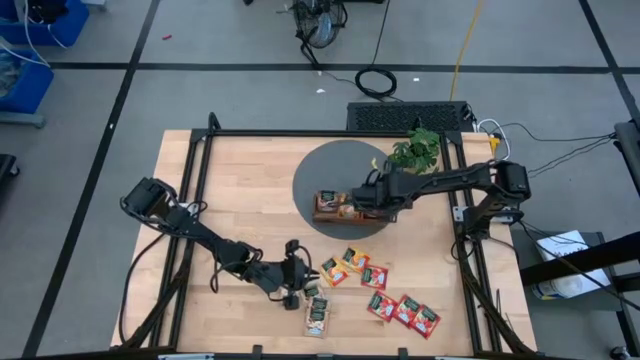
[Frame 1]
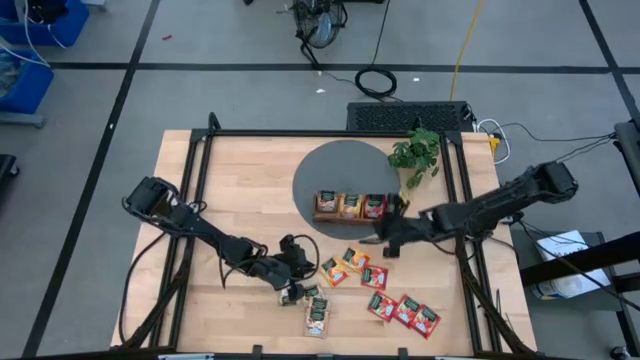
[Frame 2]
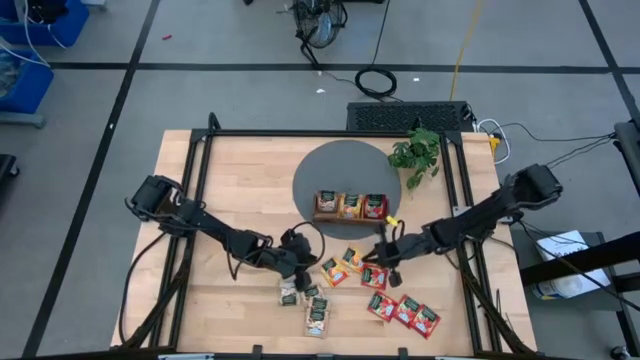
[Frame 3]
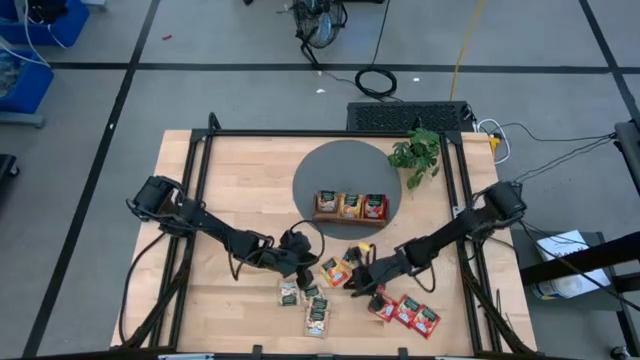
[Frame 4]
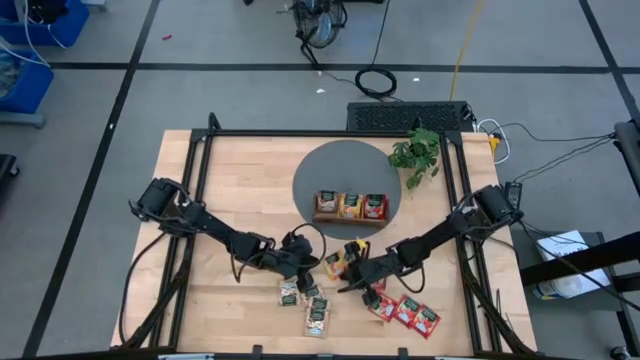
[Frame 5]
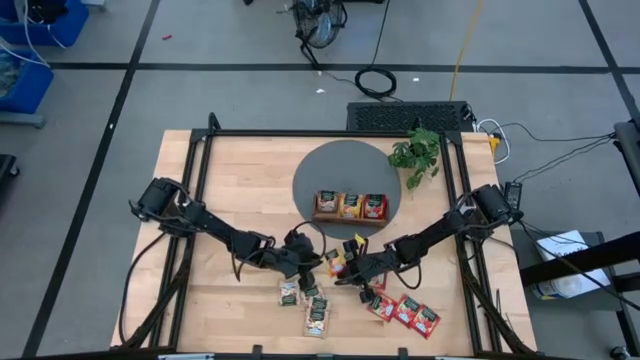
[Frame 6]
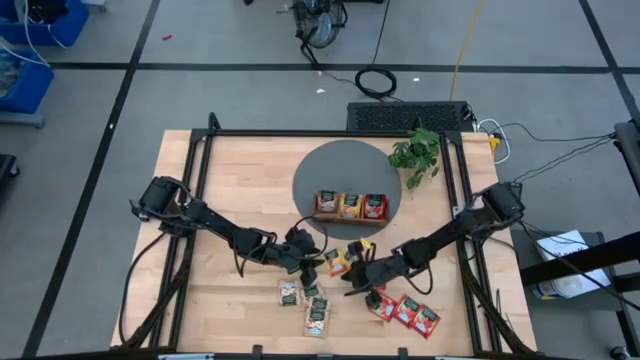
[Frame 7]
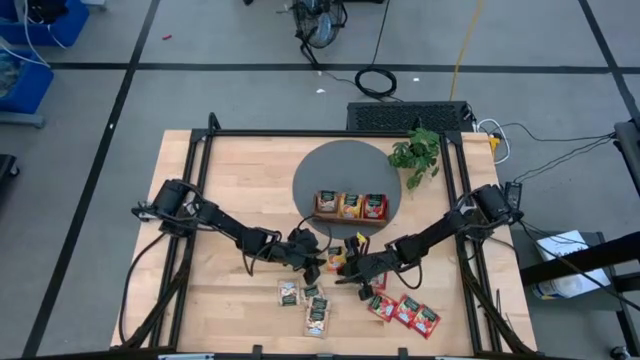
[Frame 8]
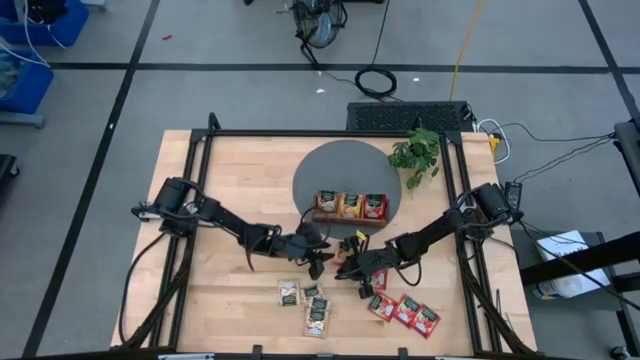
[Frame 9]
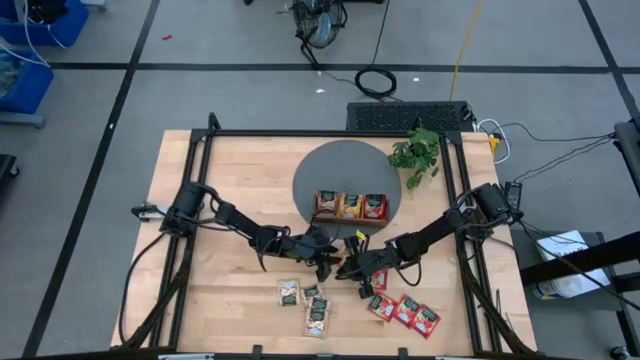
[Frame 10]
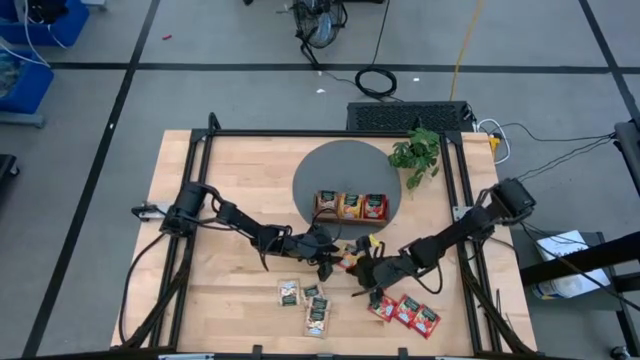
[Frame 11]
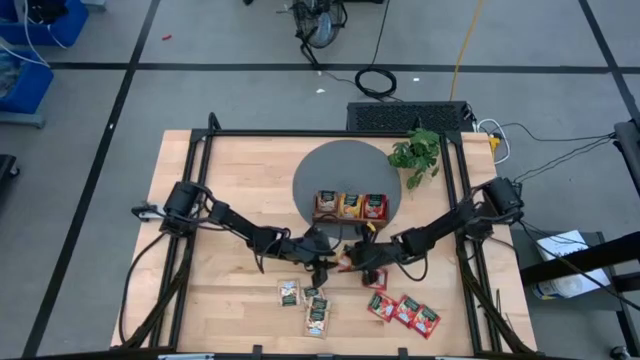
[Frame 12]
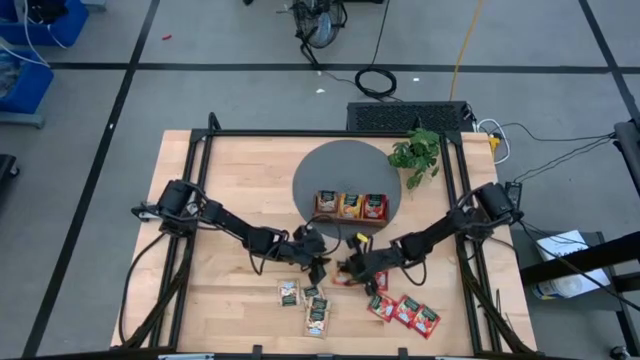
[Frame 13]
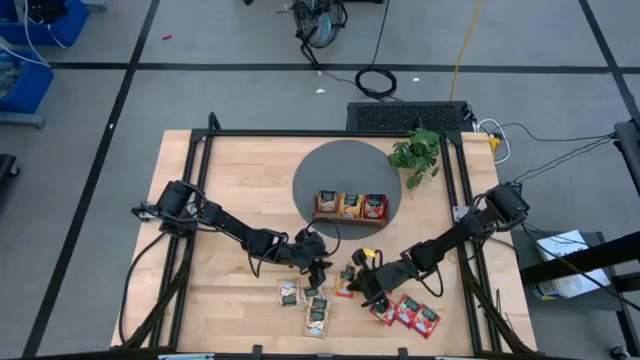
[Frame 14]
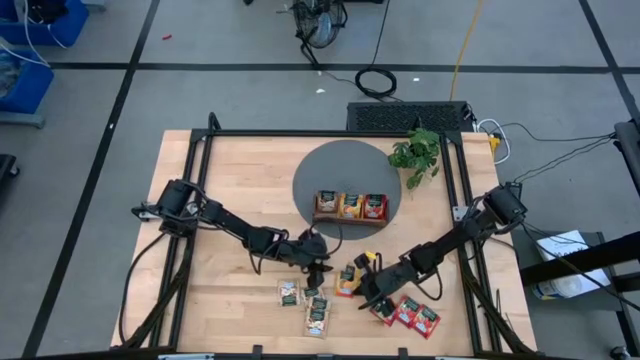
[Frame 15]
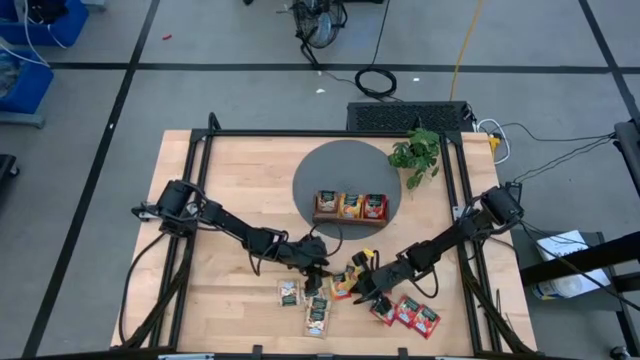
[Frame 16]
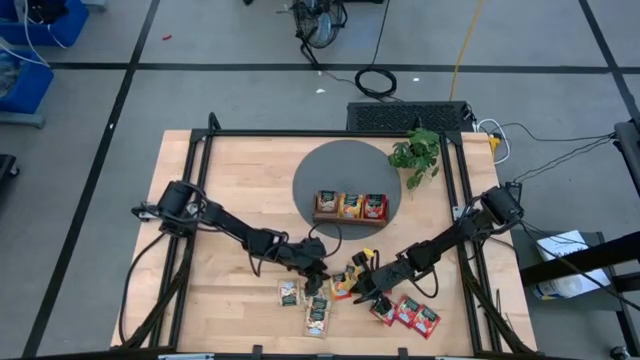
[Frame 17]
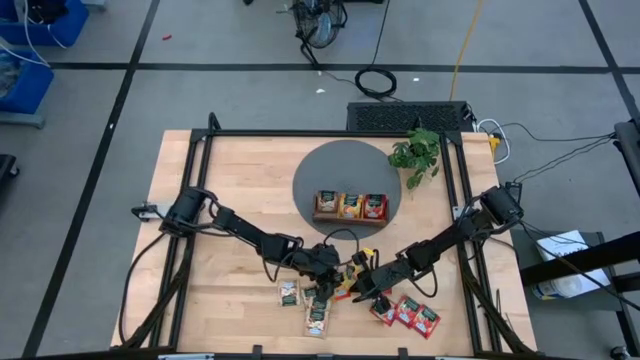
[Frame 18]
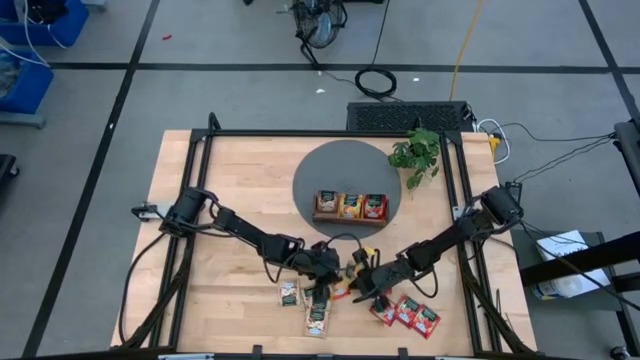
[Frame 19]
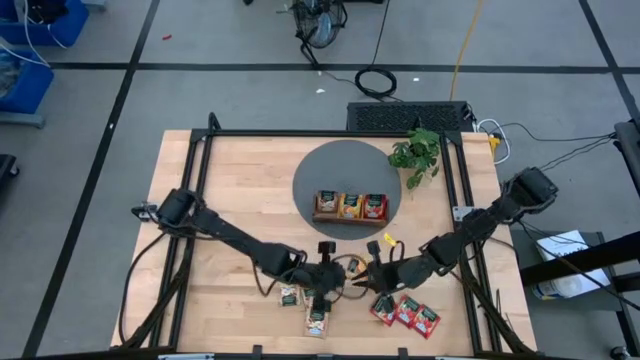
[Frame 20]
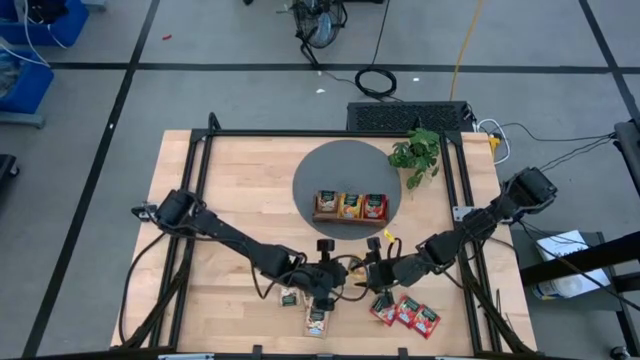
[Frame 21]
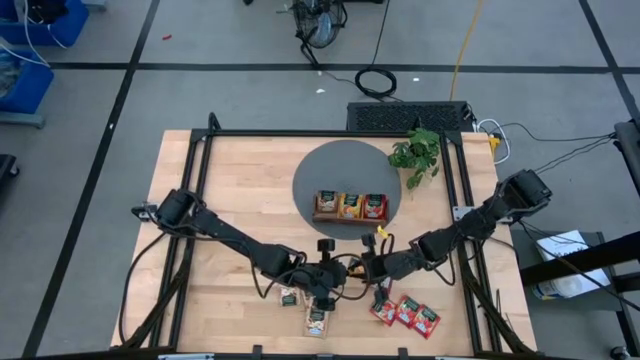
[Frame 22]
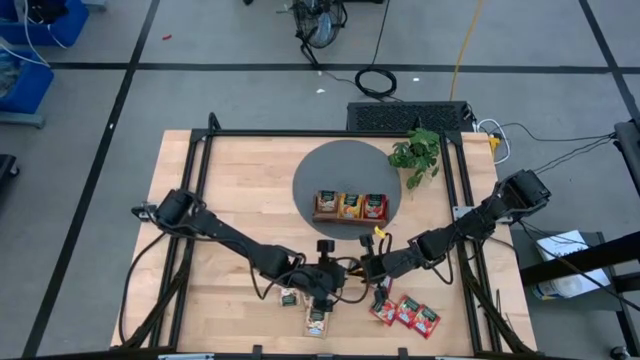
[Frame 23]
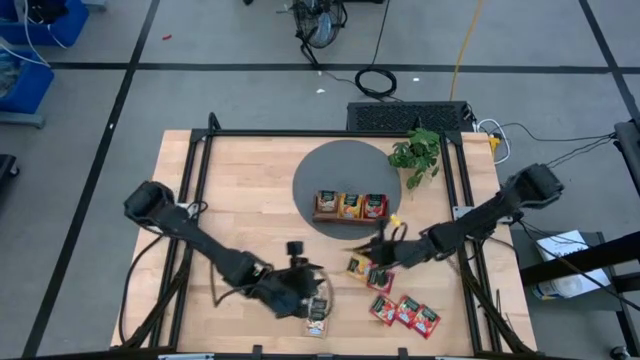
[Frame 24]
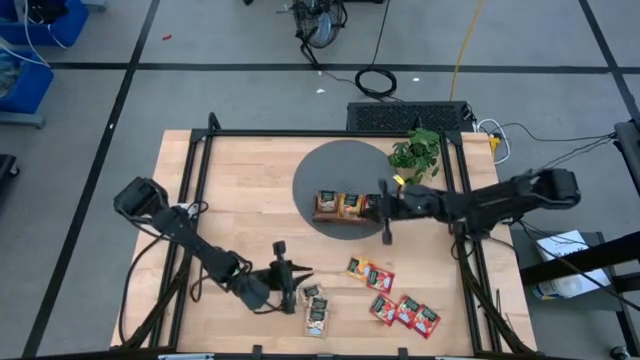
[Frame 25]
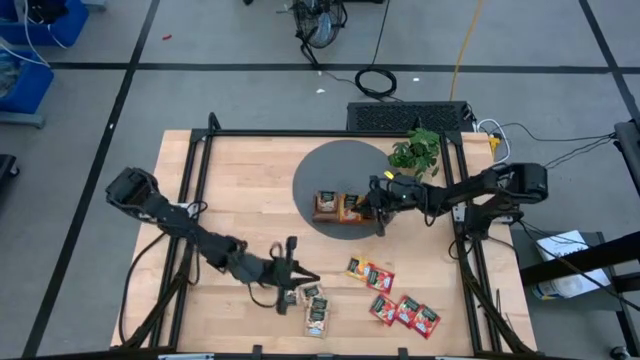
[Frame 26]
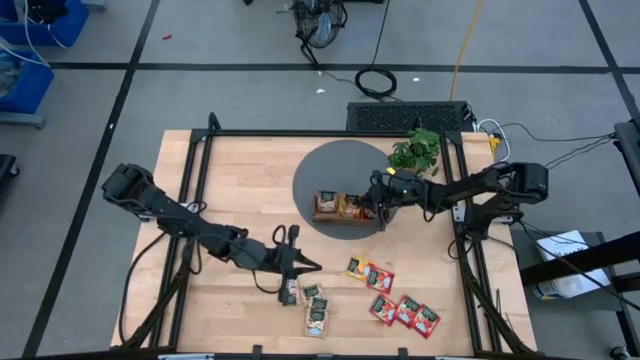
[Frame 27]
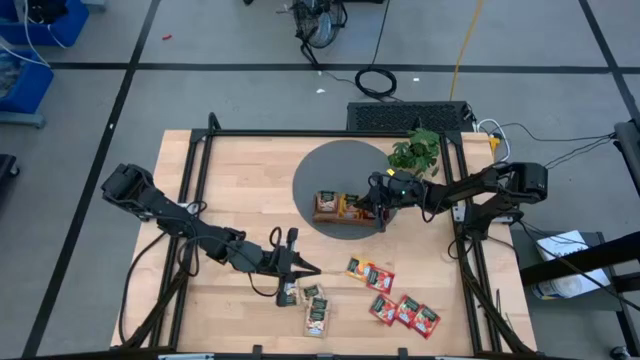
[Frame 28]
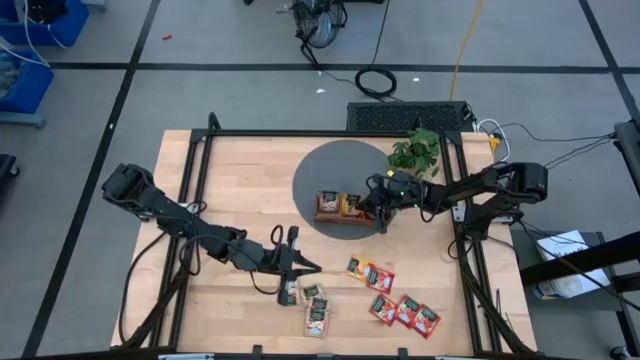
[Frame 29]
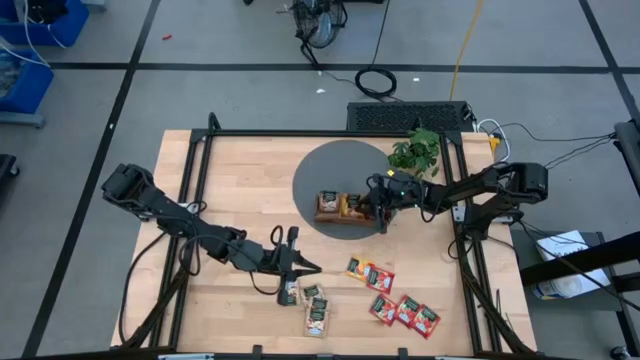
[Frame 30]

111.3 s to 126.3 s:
Task: Pick & Place Tea
Put the yellow tea bag into the middle section of the wooden organiser

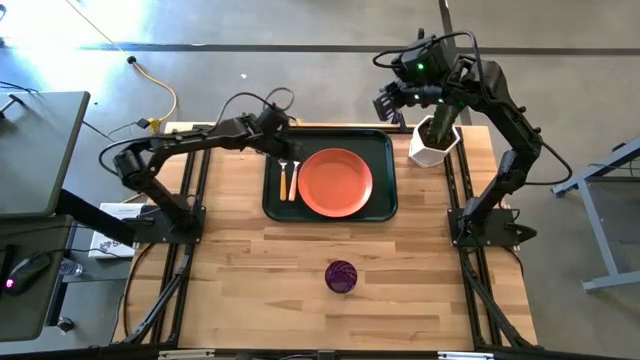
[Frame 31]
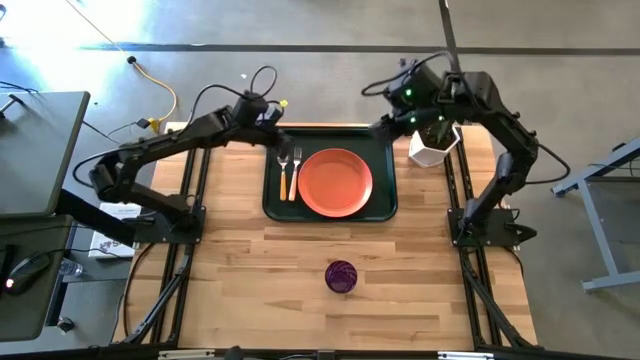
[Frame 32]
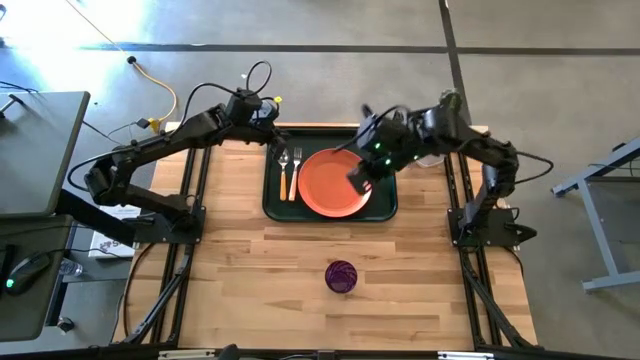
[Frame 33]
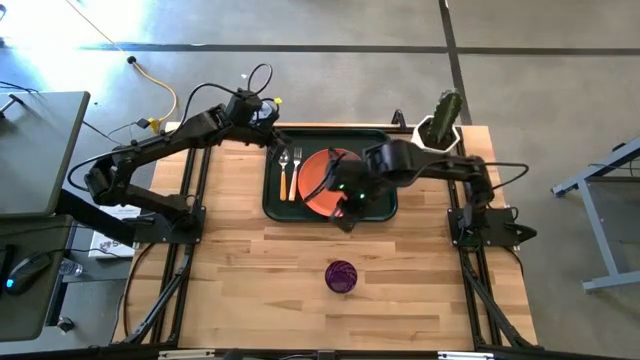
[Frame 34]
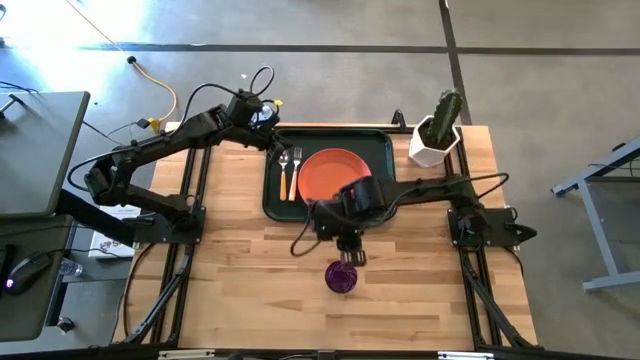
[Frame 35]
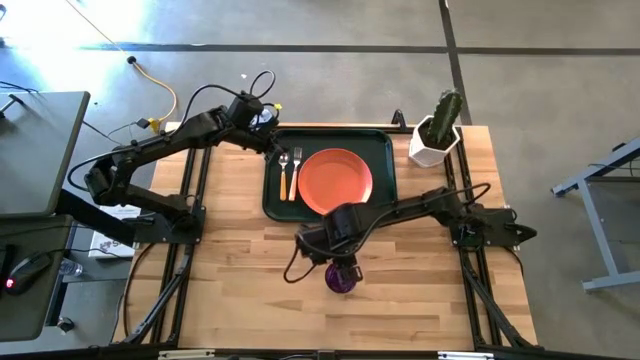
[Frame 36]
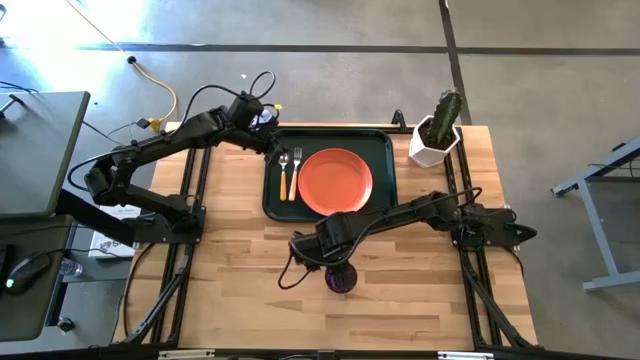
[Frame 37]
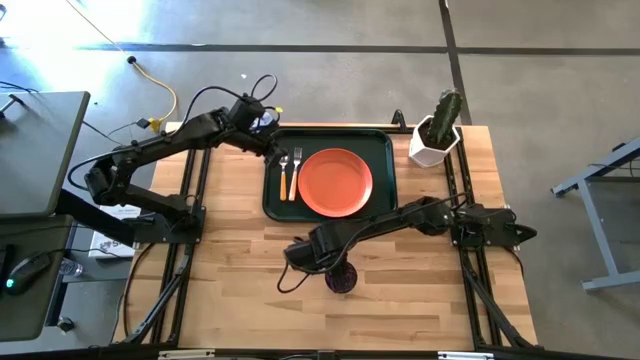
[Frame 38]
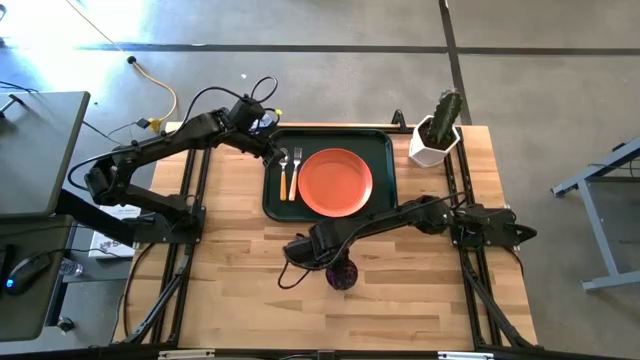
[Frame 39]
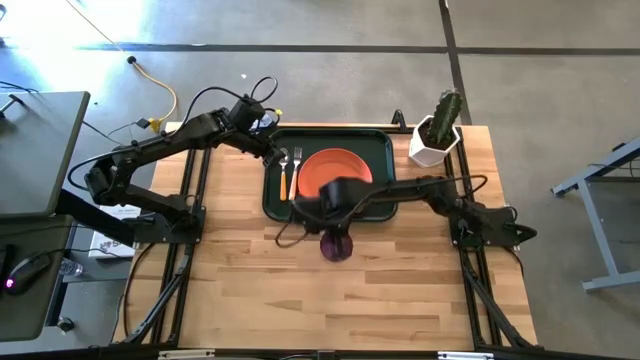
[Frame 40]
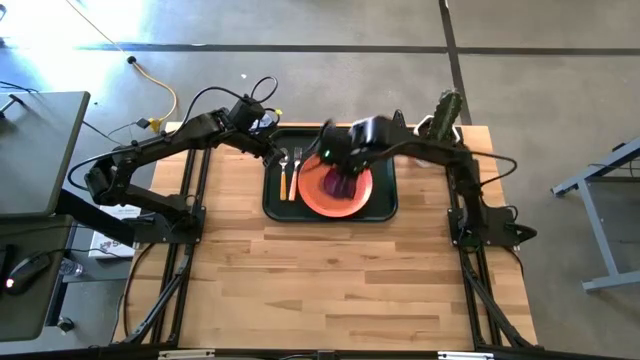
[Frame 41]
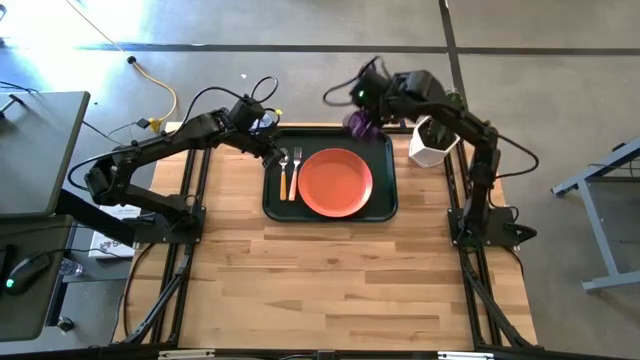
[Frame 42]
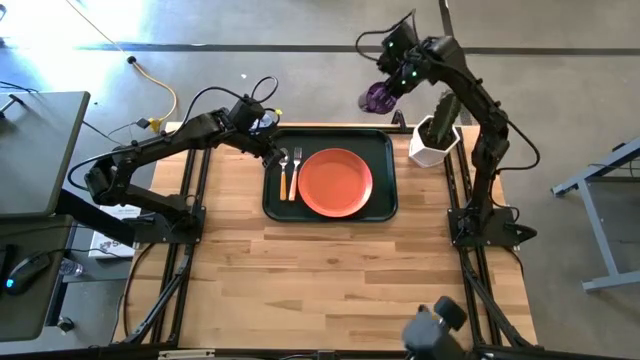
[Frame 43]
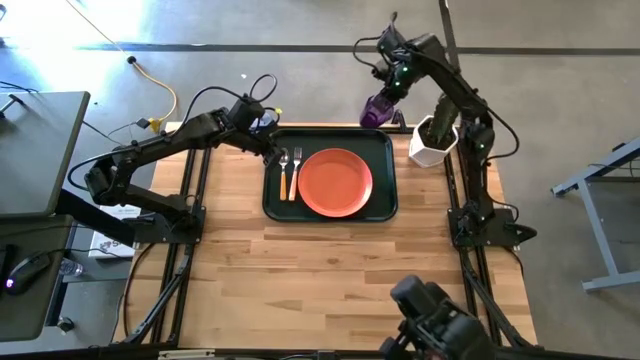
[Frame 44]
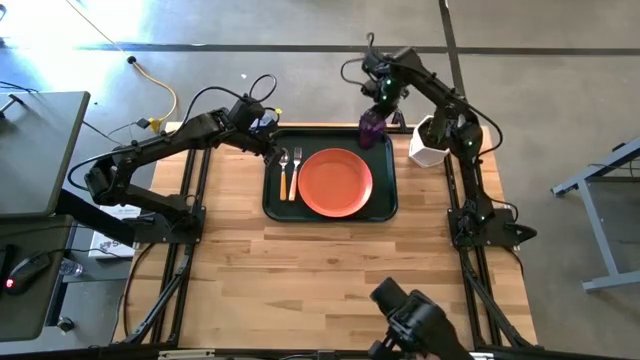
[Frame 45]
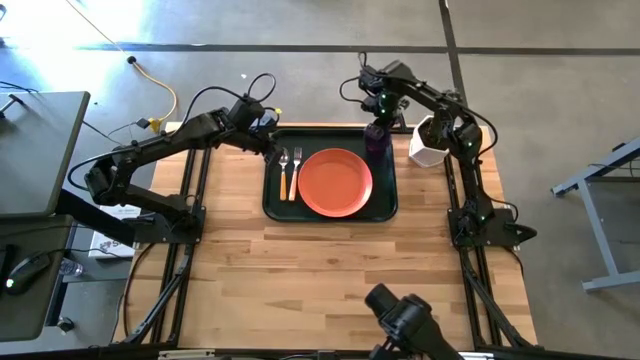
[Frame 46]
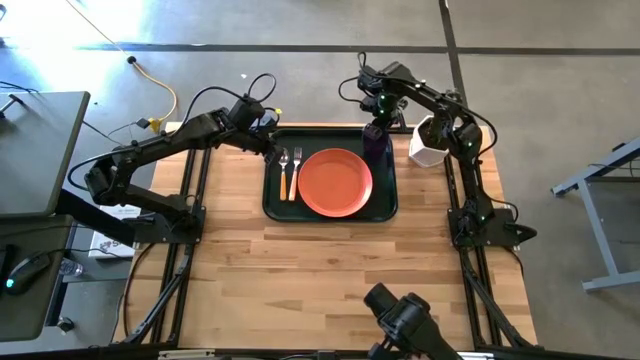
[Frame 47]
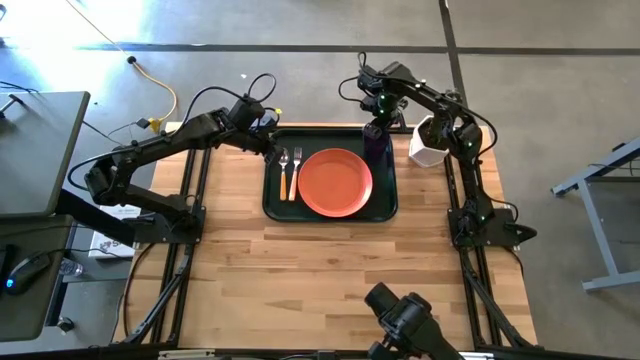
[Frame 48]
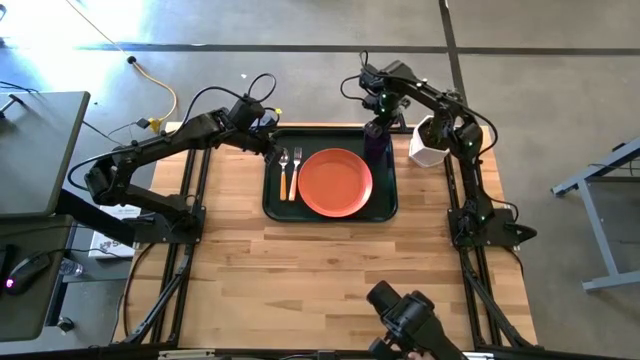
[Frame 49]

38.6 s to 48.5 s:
Task: Pick and place plate/cup/fork/spoon on tray
Put the purple cup on the top right of the orange plate
